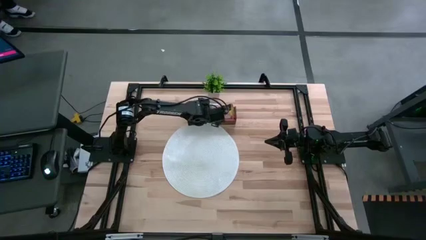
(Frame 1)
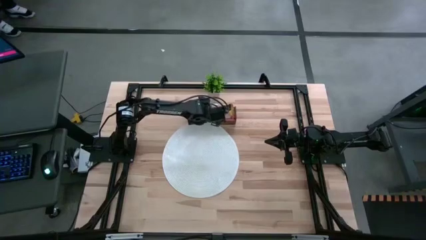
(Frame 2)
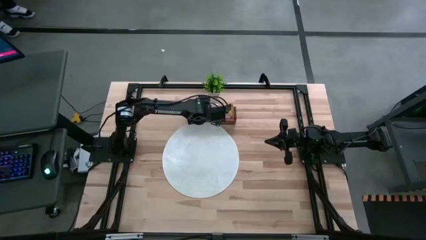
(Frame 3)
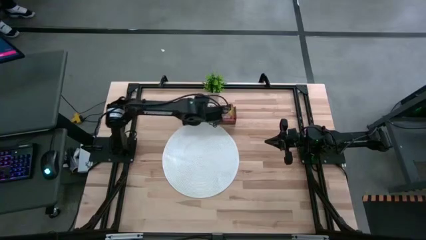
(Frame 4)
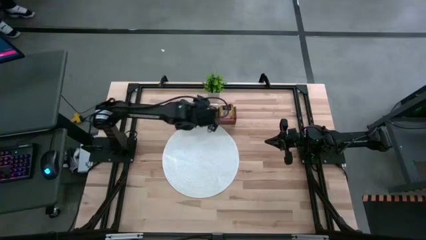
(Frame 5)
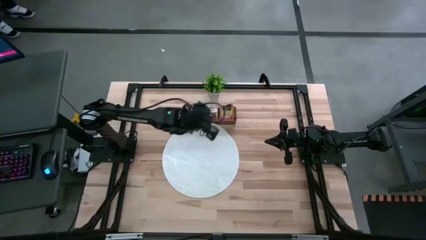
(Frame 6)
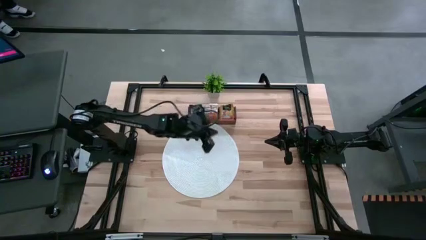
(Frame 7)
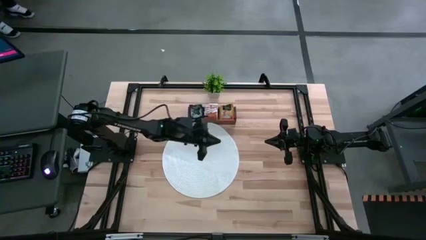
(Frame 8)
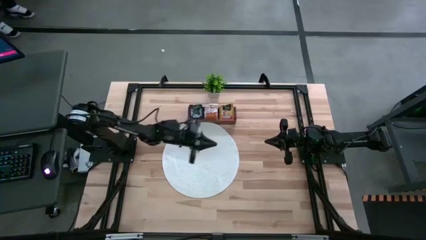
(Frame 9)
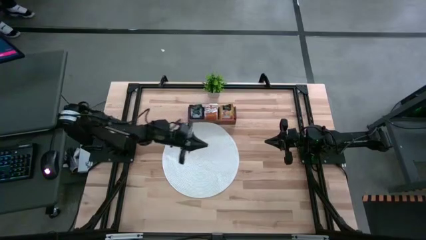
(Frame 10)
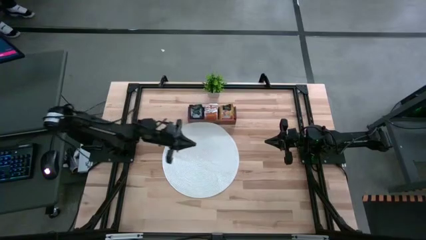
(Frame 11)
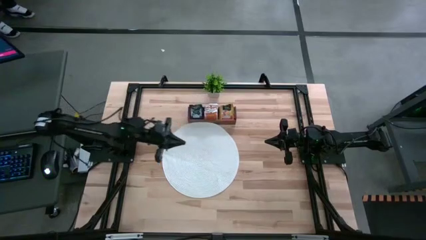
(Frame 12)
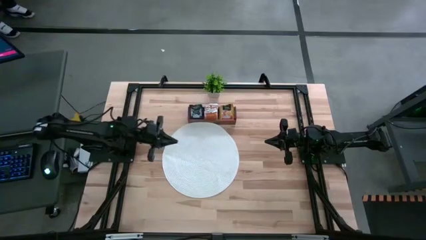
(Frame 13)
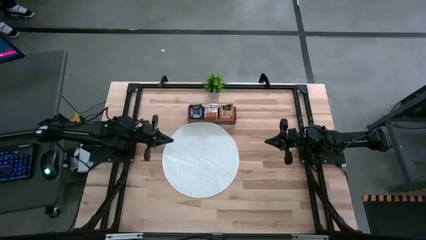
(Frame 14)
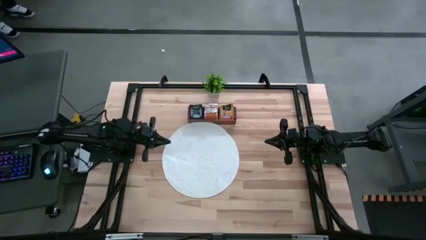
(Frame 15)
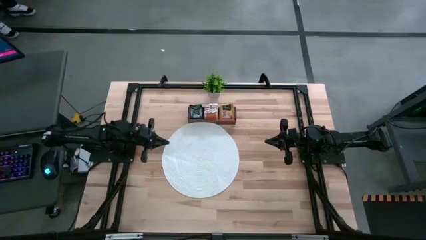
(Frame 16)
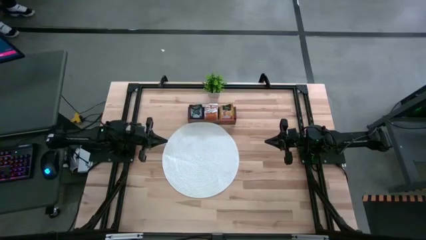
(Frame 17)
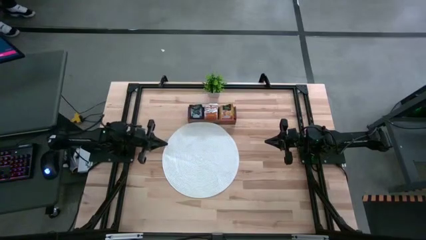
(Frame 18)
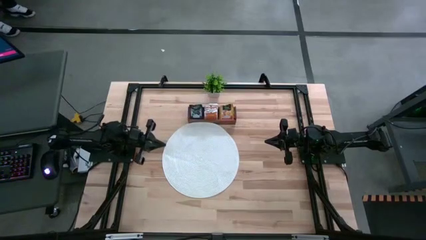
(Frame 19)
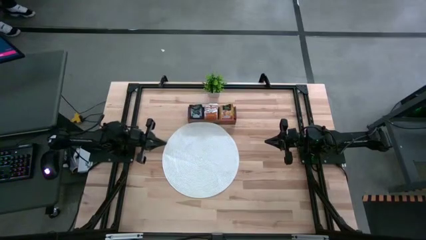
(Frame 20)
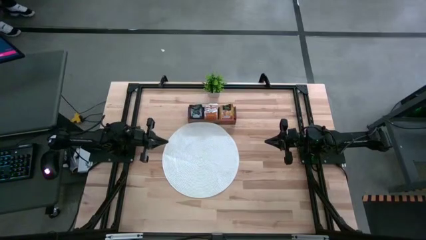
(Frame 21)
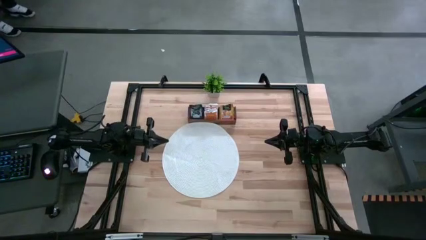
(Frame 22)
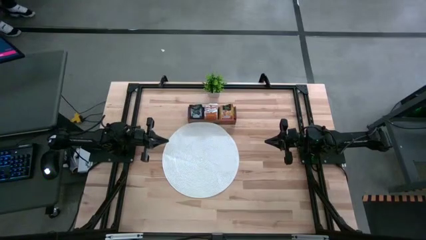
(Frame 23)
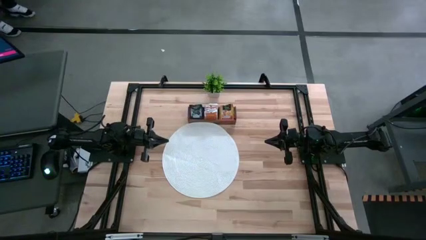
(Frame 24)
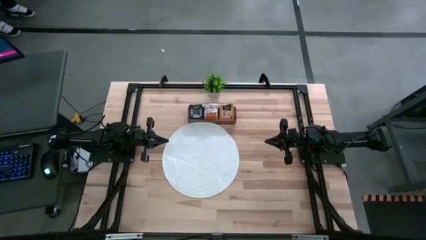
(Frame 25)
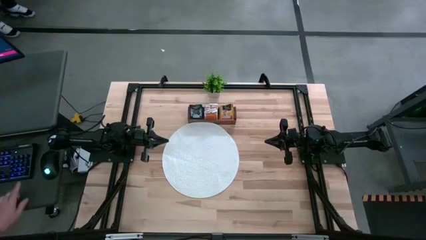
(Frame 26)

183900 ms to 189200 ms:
Task: Pick & Place Tea
Return to Home Position

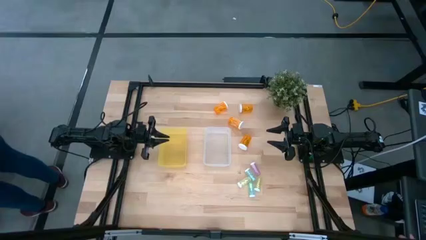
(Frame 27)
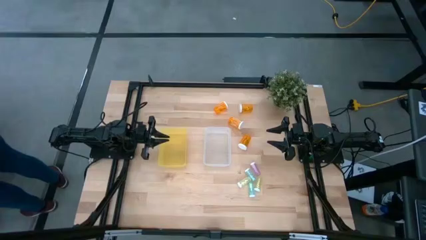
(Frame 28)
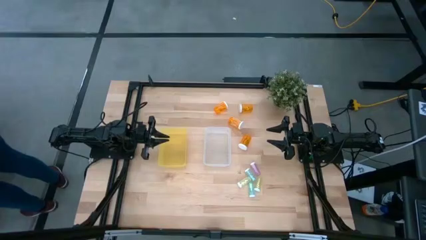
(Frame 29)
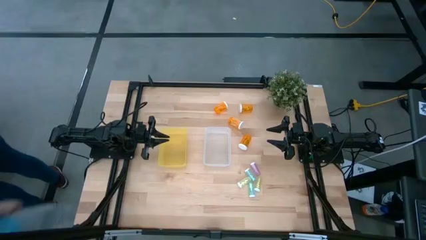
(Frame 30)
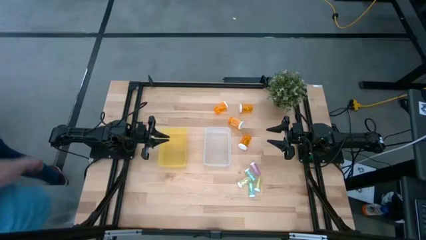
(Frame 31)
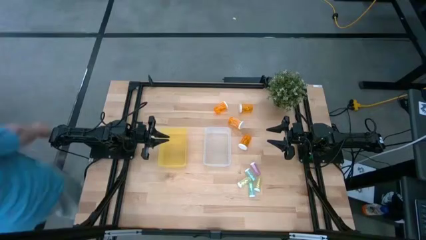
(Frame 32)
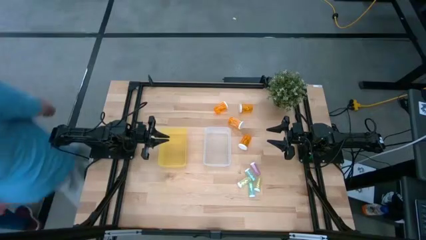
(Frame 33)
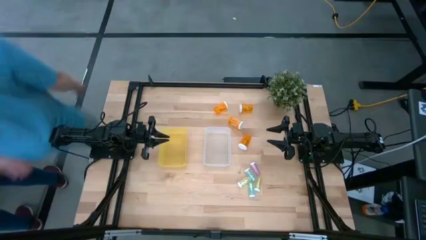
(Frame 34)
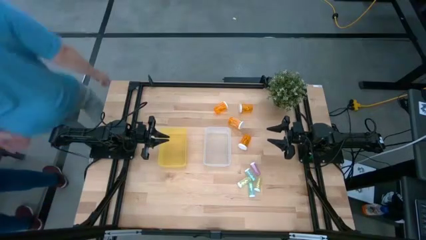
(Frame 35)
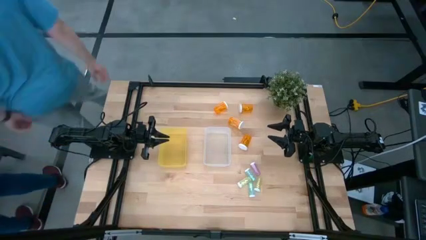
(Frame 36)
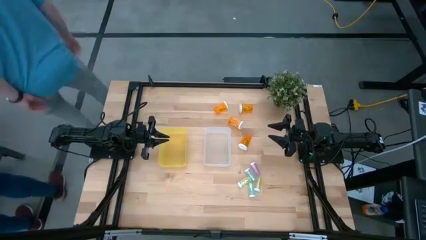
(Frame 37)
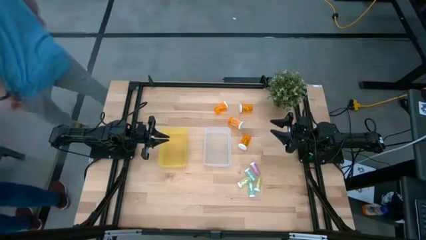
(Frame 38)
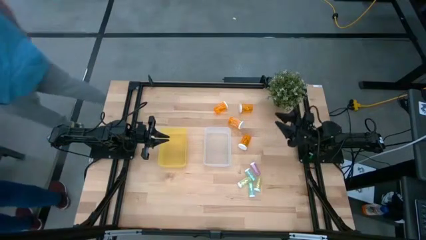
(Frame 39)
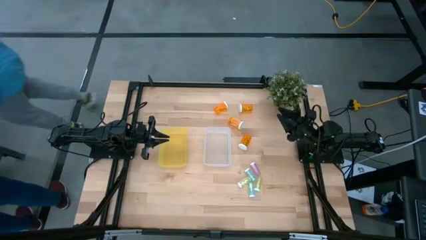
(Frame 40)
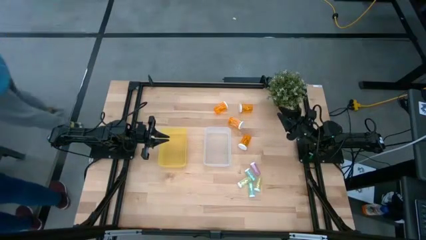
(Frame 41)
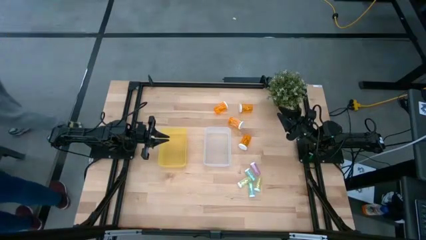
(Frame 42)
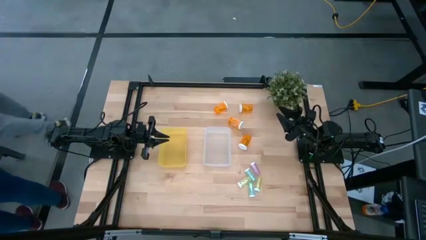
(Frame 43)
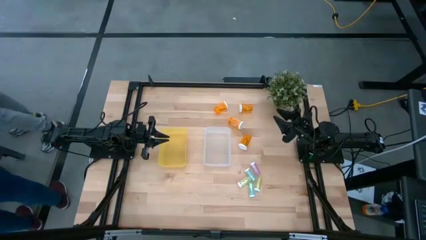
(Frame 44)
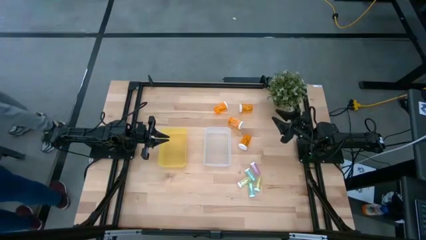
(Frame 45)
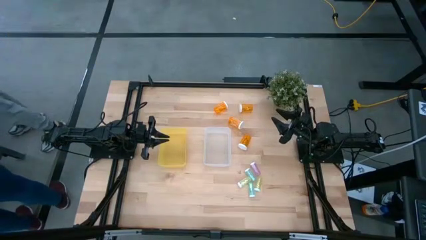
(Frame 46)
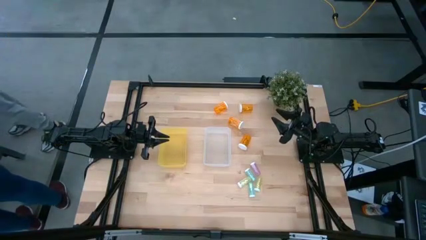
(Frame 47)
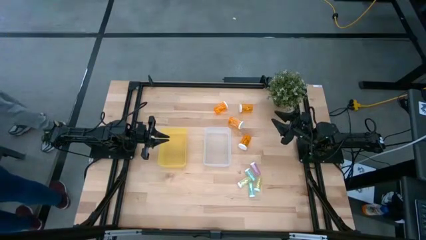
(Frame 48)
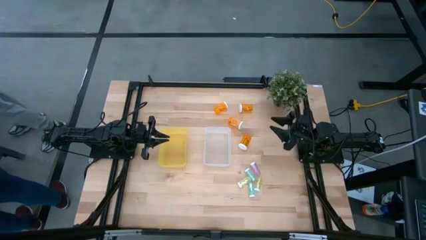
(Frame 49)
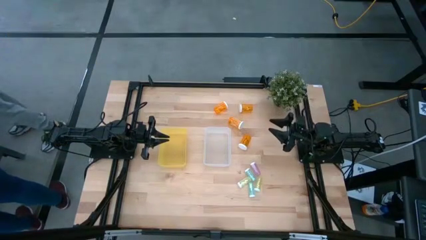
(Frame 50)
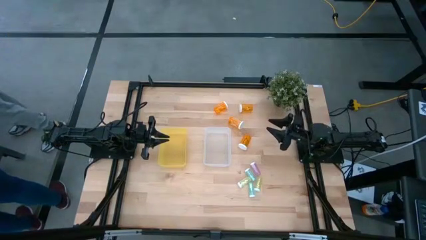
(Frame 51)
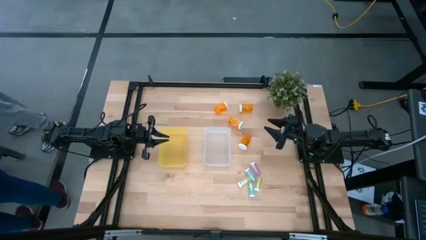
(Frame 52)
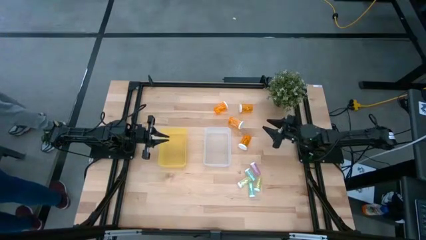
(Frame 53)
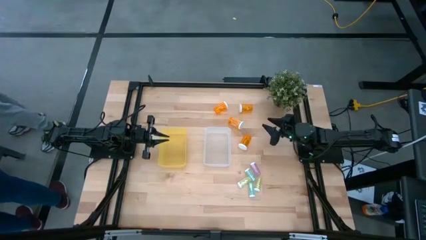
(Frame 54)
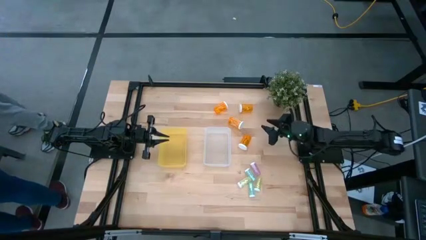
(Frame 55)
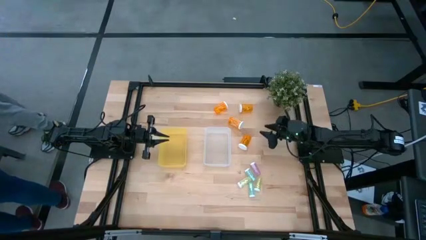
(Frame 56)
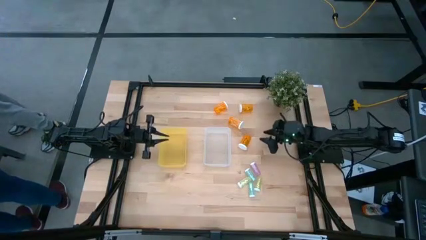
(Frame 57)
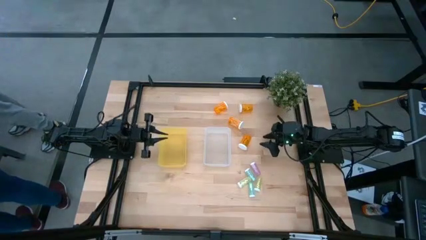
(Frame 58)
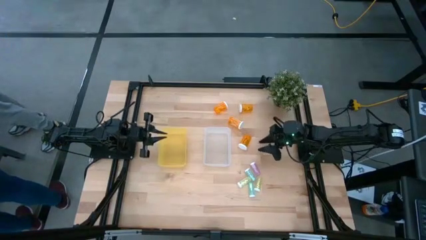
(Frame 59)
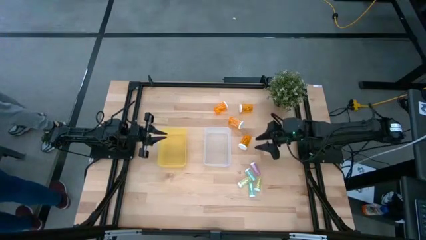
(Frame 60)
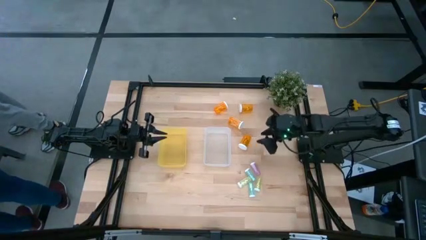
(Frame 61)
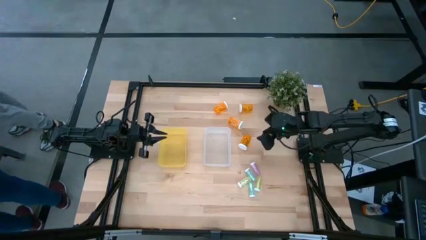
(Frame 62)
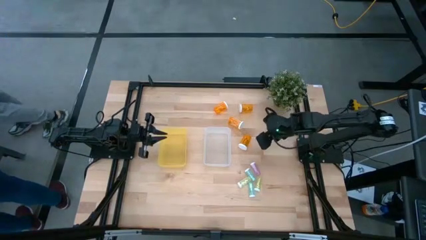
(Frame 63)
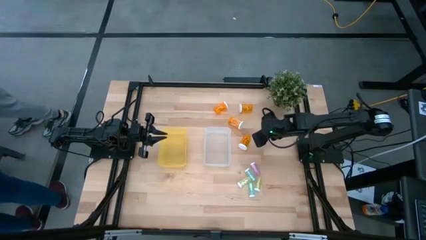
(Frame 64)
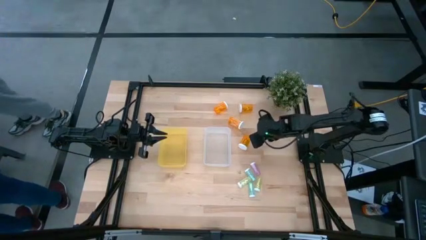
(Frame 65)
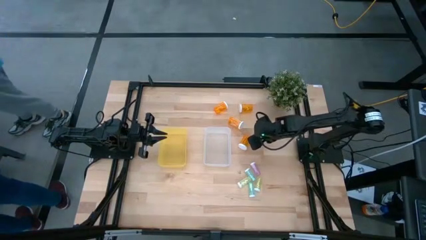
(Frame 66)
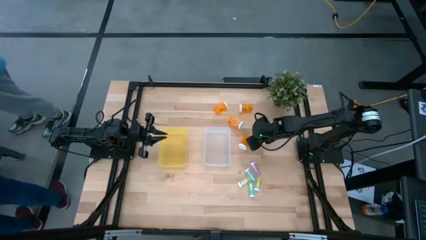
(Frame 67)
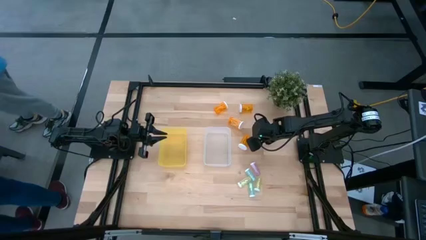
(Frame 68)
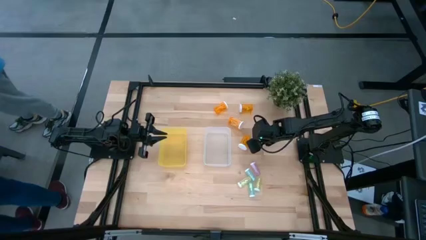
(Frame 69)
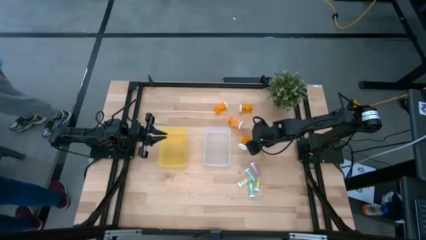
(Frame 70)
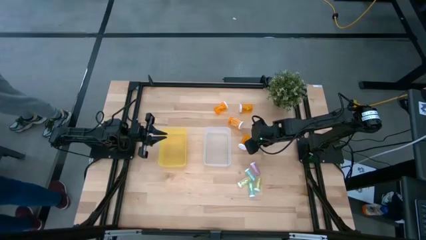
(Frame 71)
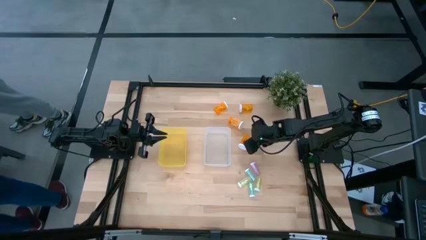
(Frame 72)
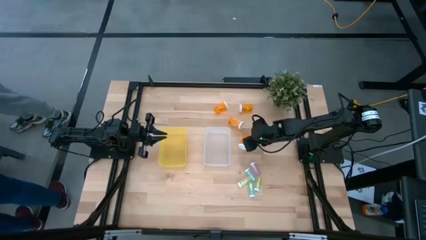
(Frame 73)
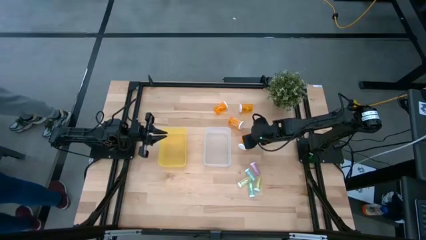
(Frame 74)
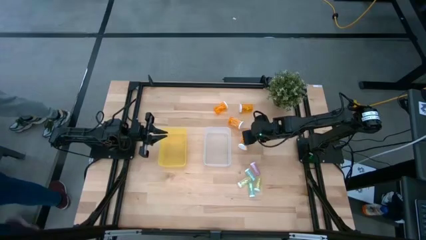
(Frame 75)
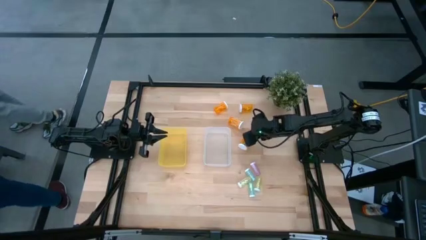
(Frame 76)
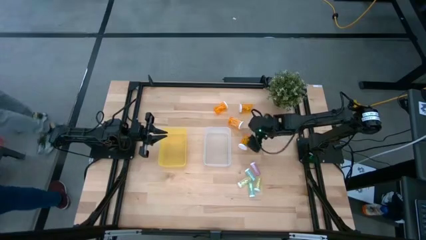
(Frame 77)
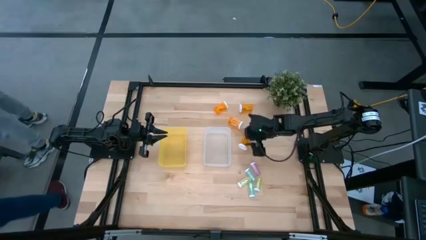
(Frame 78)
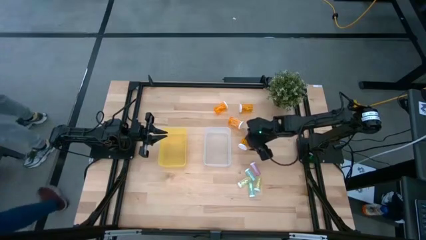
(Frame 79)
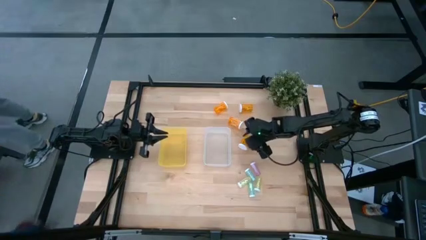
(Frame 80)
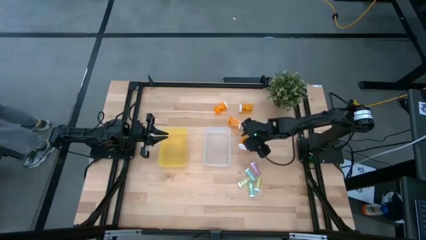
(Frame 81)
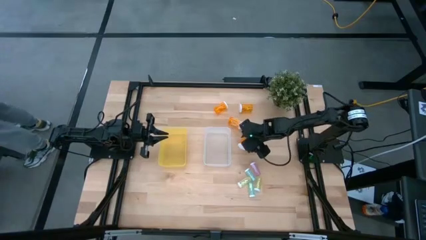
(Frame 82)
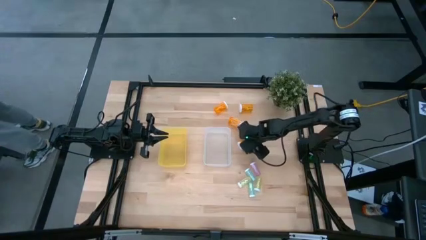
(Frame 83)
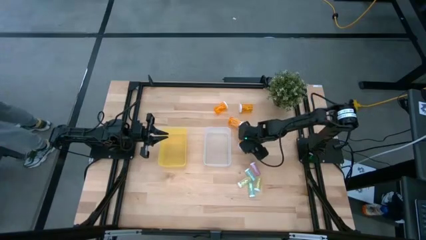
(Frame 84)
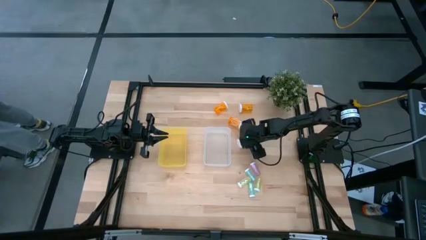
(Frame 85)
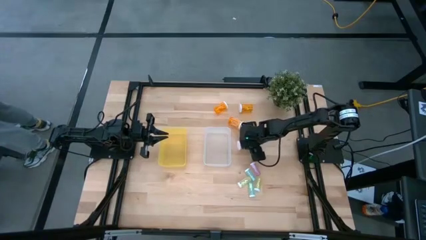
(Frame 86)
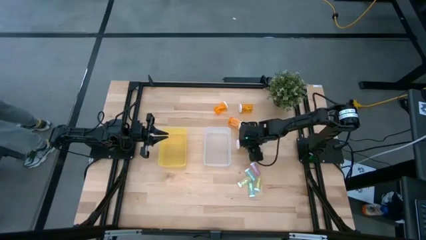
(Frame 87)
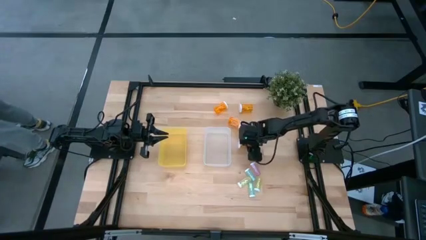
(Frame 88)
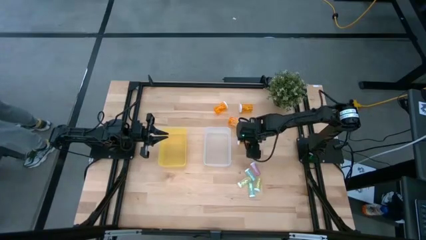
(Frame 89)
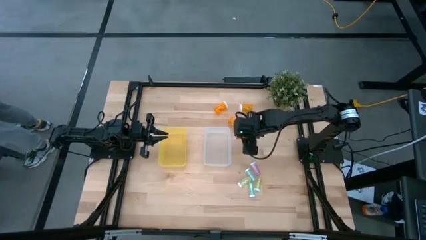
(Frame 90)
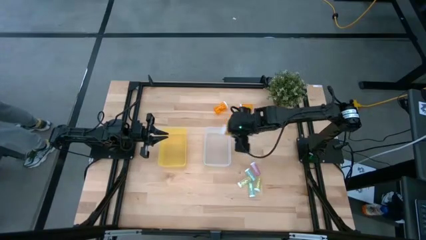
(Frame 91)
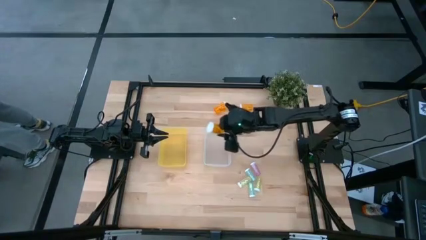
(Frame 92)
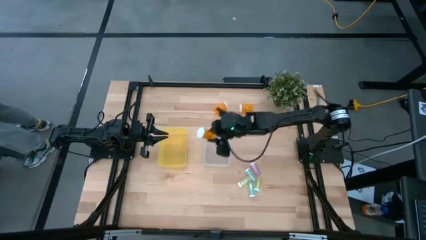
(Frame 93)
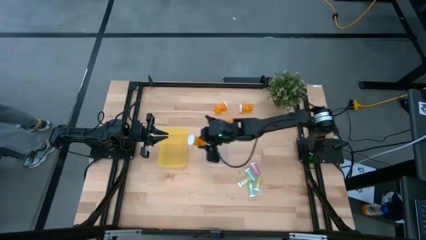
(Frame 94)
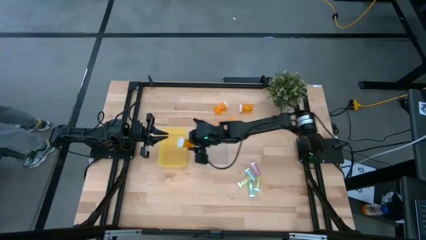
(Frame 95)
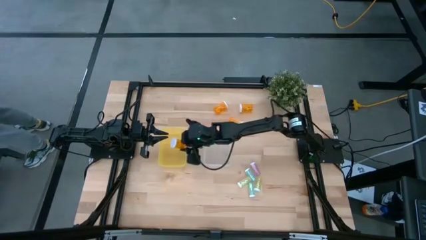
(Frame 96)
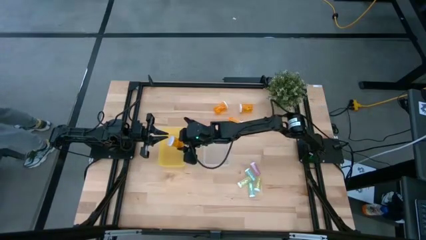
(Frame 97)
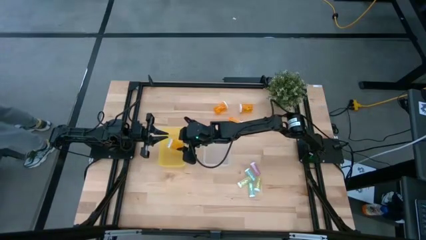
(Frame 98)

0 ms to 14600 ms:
Task: Pick and place medicine bottles into bin by pill shape (circle, oval)
Put the orange pill bottle into the yellow bin
